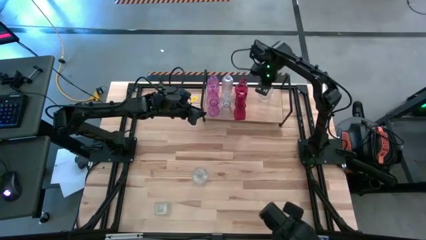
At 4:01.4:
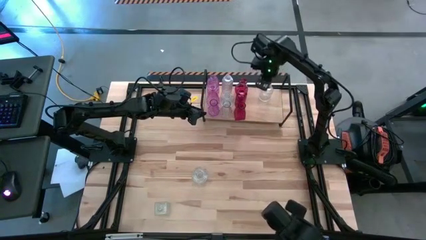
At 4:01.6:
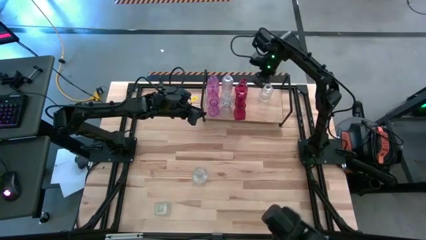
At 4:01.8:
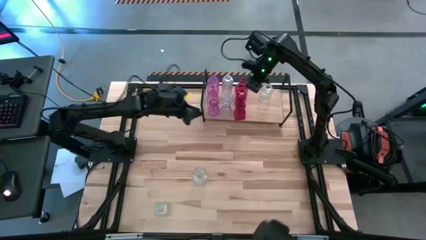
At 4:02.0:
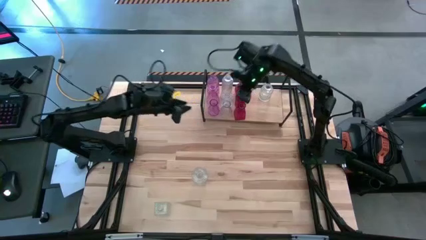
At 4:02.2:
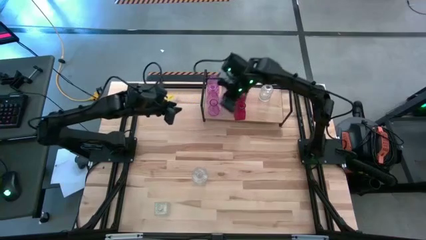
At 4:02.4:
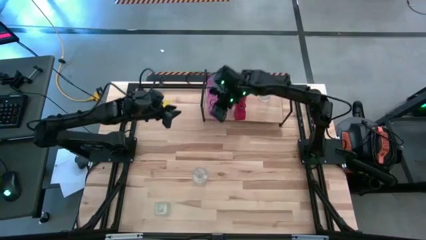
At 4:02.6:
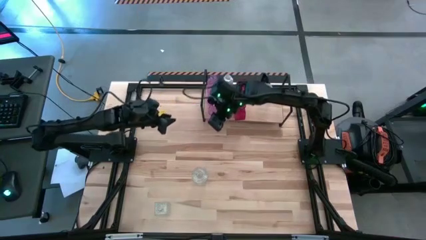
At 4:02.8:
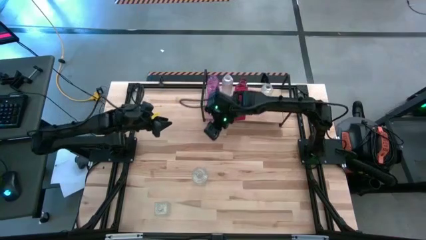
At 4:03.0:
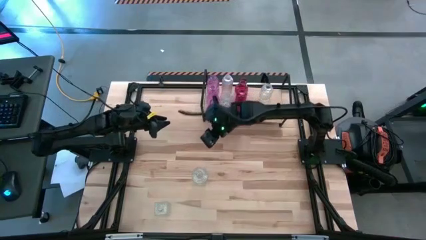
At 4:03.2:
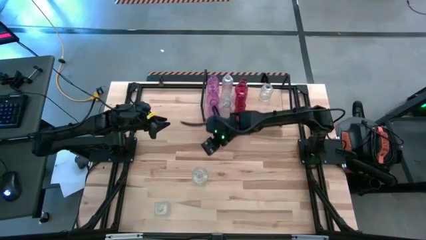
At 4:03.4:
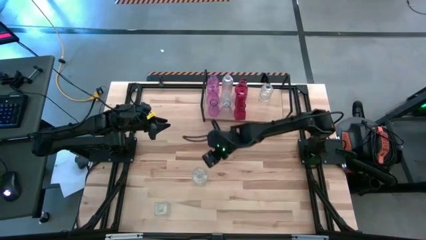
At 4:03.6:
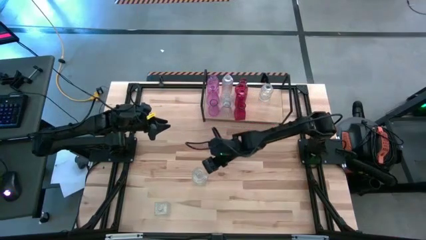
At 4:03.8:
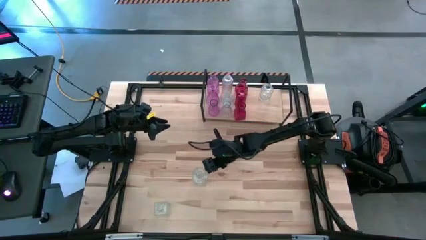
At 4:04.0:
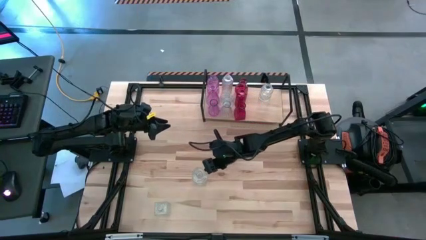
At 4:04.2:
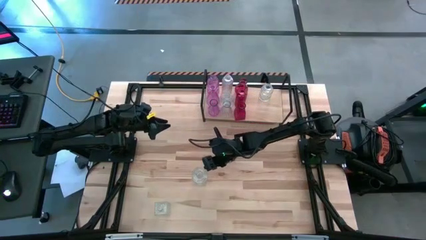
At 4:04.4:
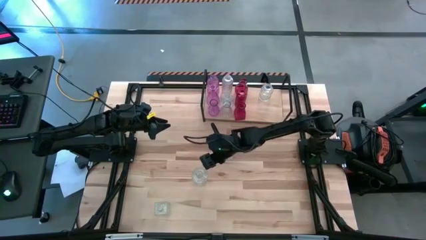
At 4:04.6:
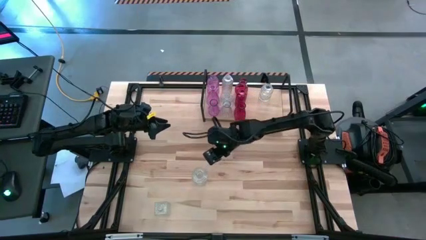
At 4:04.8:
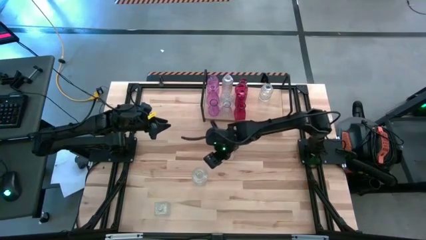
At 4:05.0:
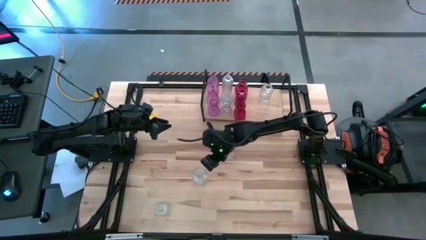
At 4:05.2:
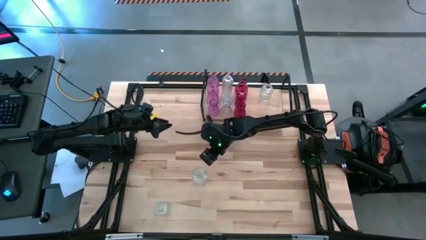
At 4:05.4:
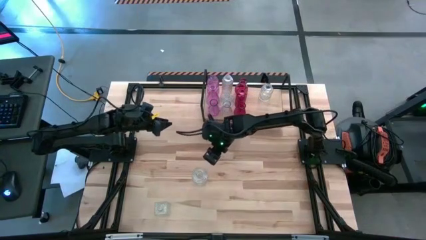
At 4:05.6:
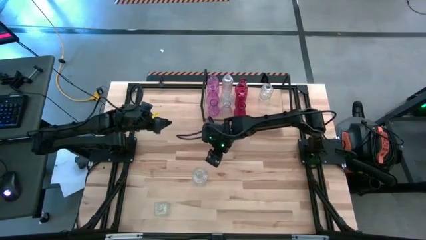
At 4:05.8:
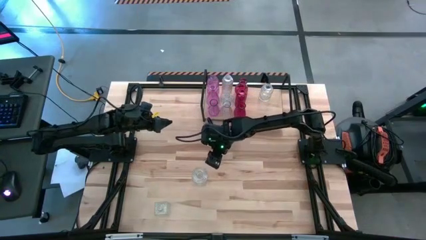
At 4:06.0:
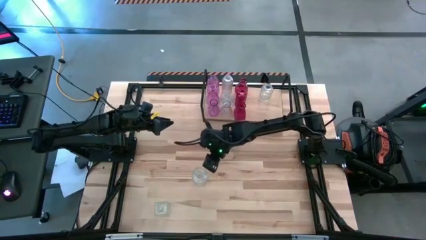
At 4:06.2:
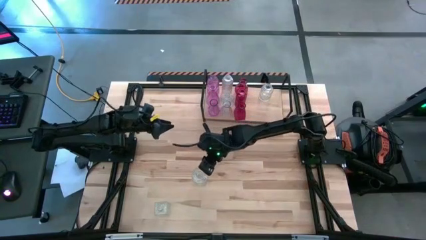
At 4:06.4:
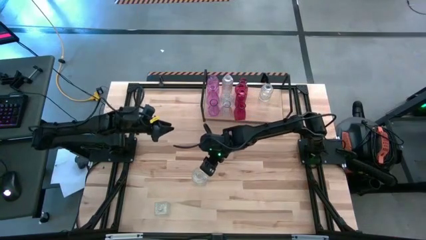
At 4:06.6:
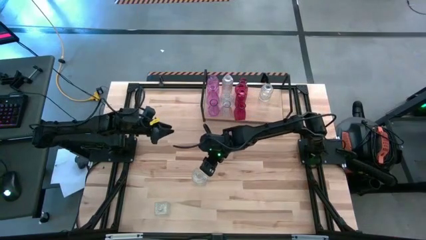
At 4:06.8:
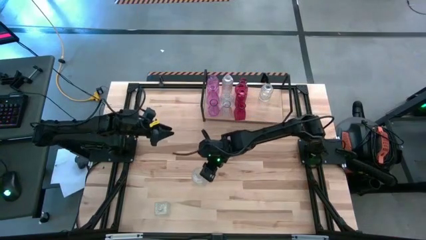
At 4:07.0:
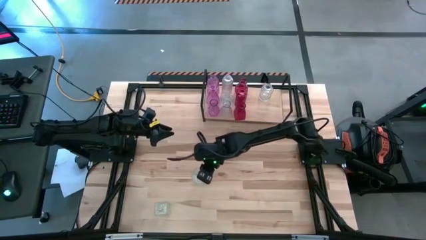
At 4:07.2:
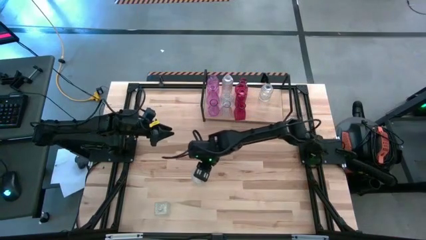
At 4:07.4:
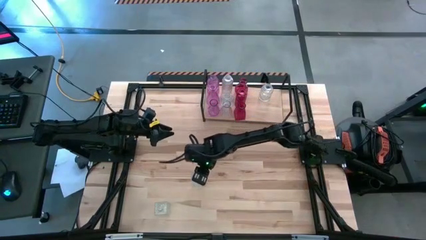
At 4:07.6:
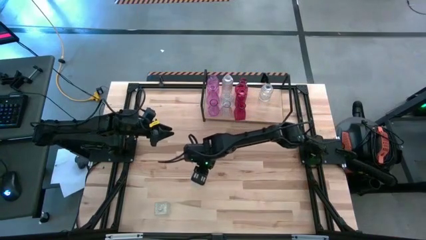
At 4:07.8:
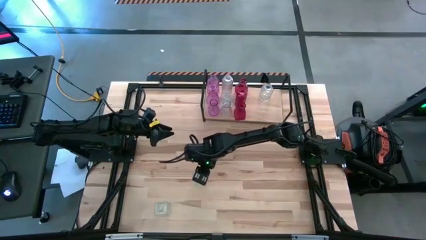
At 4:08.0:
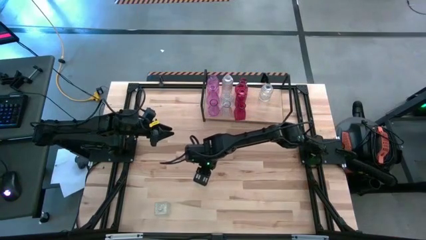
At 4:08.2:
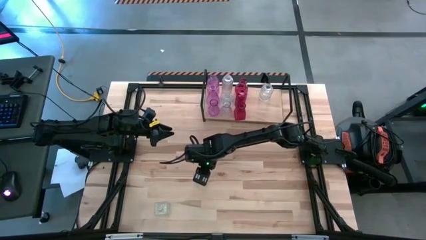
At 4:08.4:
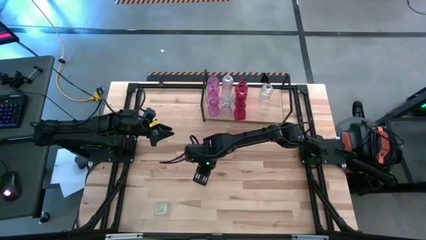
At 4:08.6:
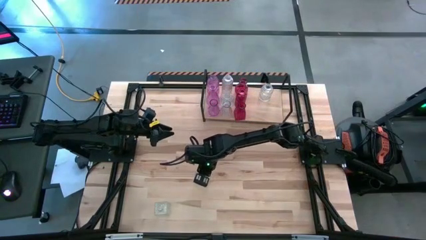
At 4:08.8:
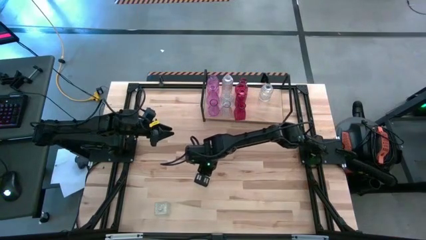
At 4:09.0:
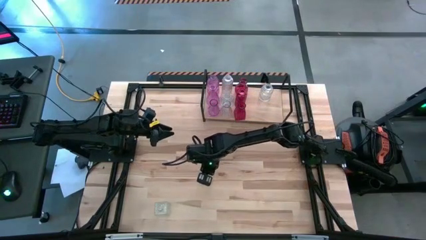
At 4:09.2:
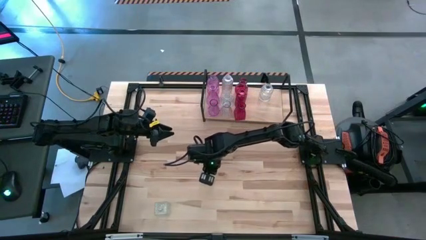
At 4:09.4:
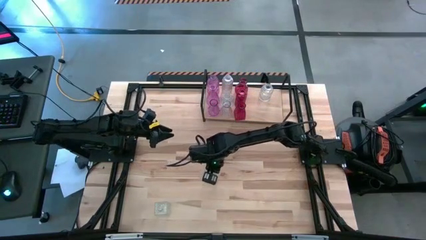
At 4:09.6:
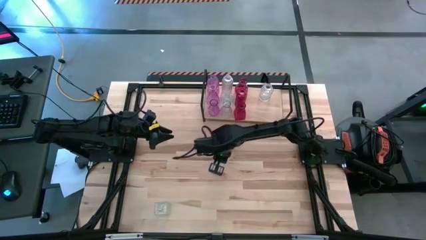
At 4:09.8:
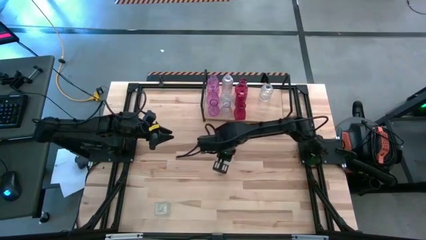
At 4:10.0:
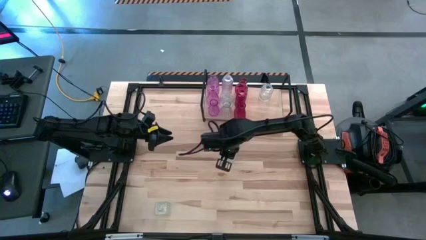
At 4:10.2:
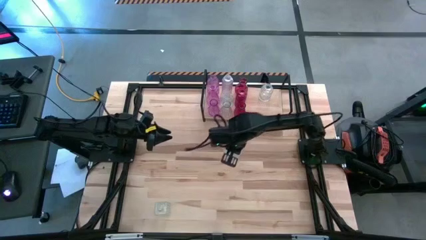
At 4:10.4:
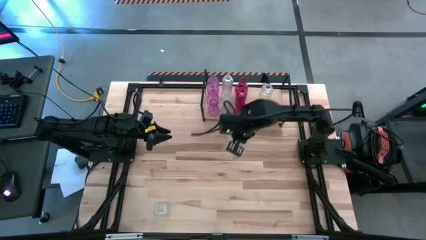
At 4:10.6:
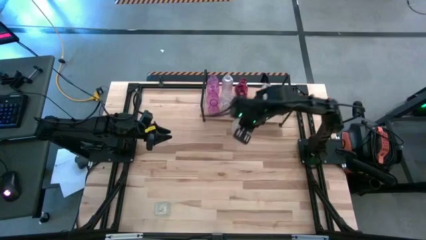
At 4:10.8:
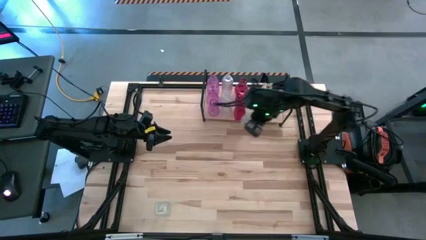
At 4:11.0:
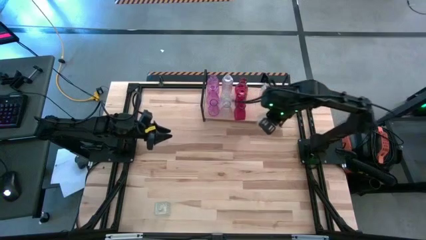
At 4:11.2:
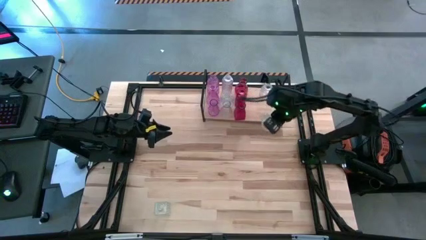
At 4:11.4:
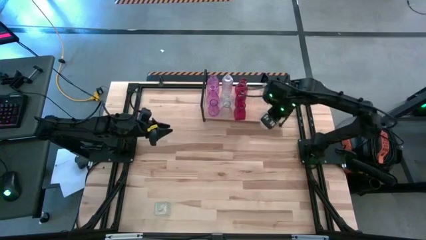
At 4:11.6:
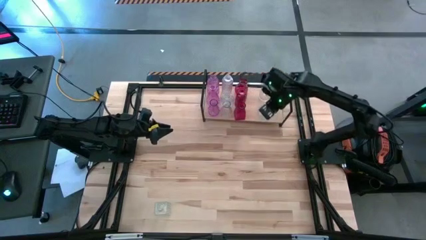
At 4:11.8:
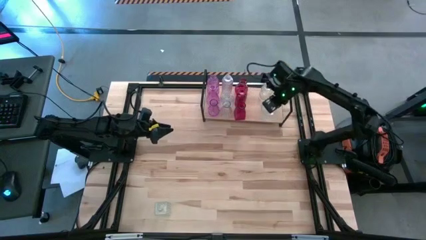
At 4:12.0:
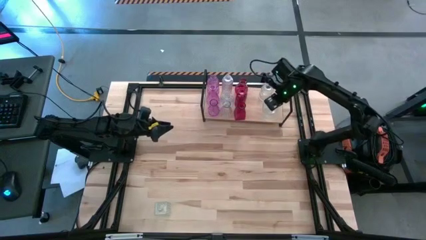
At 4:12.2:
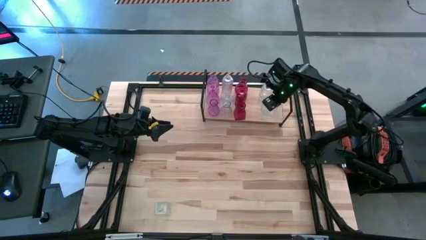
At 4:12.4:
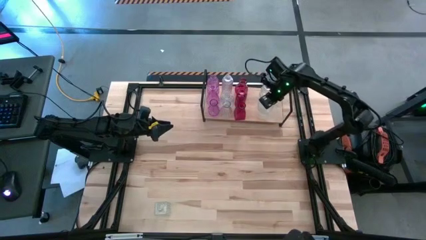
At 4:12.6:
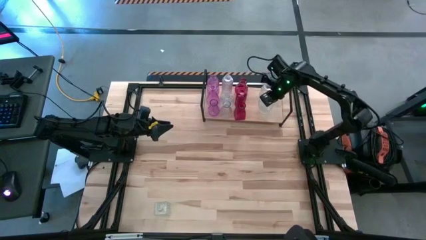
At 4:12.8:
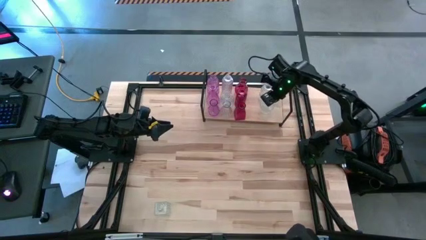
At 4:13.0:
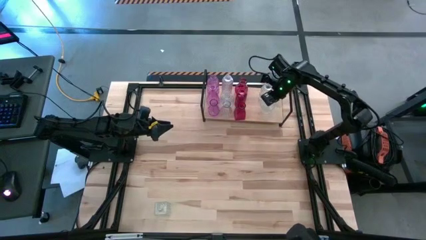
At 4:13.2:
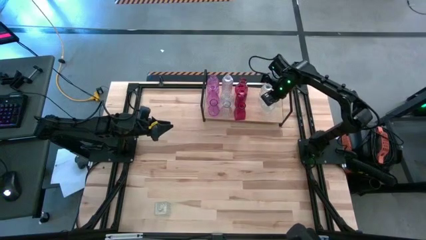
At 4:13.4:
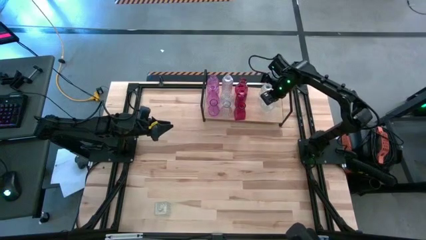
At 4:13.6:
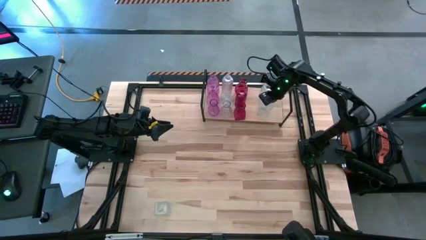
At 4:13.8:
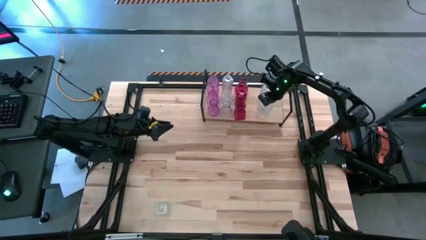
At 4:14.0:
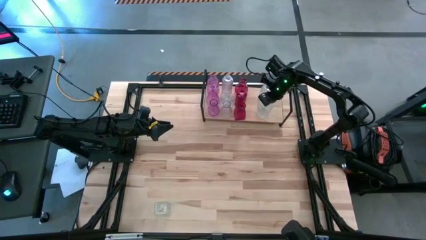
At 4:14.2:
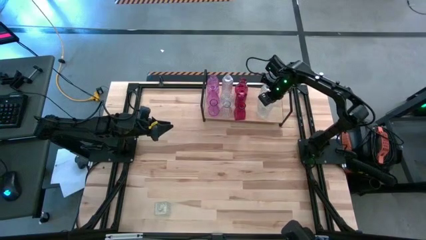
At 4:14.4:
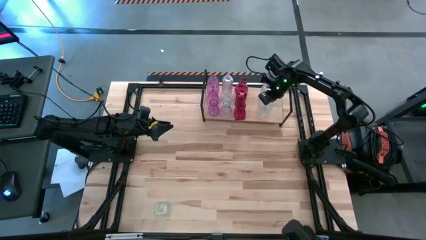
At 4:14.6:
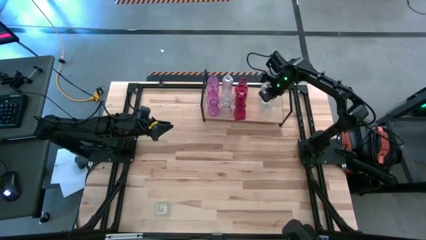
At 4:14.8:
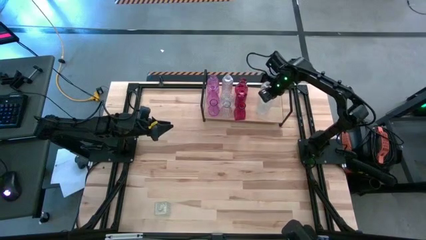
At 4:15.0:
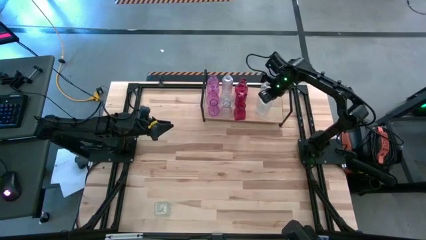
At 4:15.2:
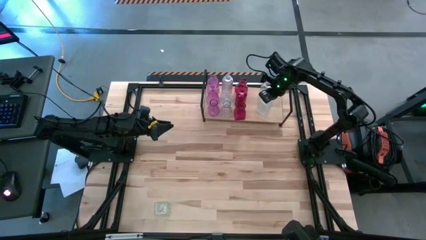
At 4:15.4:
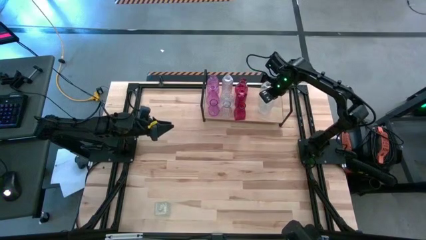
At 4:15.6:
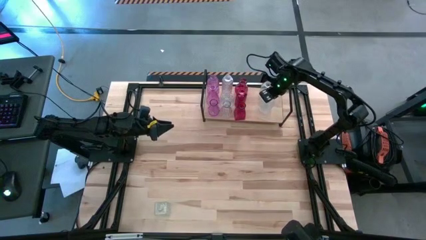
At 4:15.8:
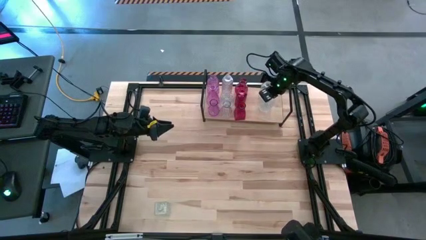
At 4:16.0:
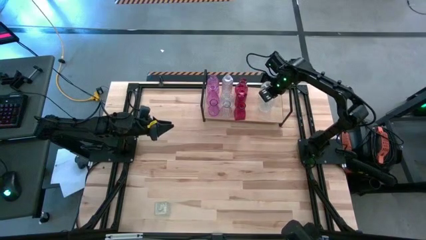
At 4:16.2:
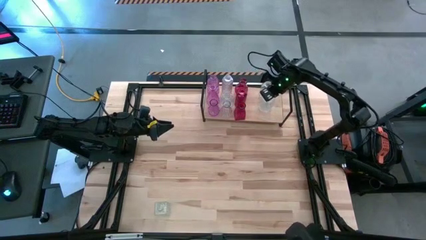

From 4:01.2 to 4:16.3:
Task: sort vases onto shelf
Align the transparent vase with the other transparent vase on the shelf
